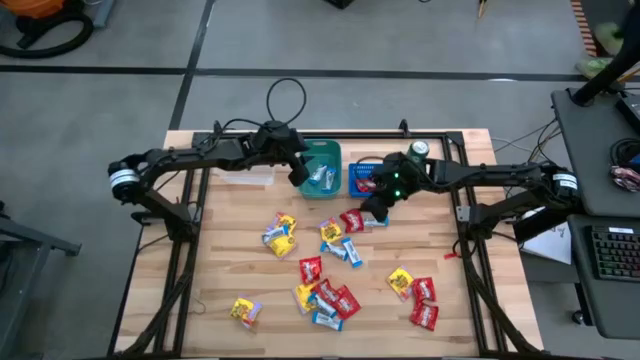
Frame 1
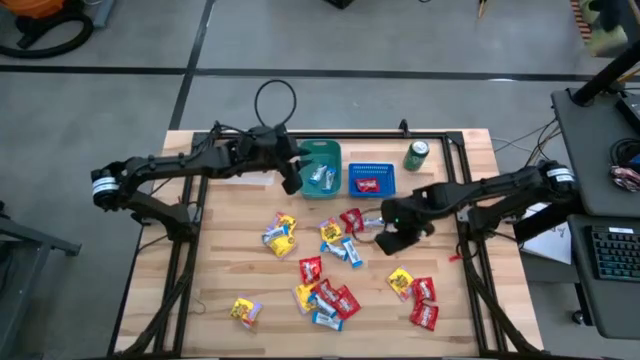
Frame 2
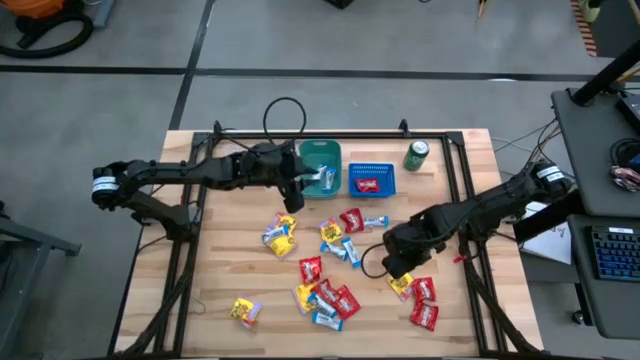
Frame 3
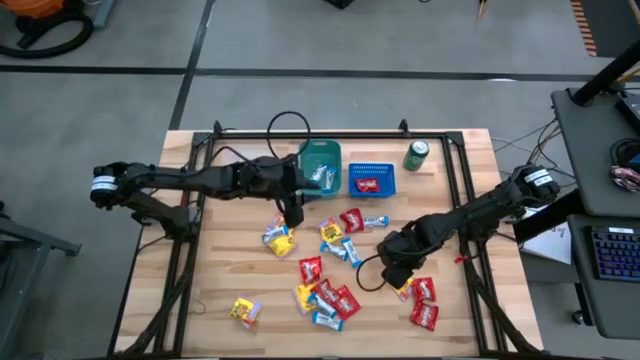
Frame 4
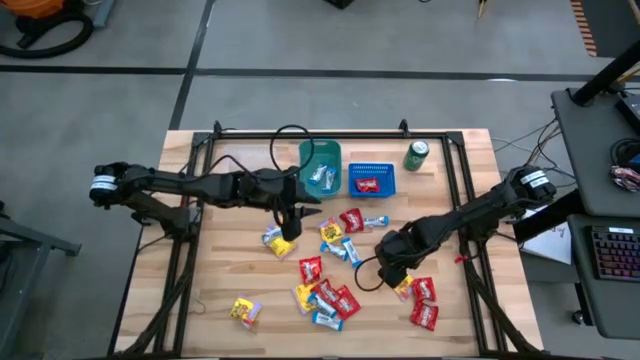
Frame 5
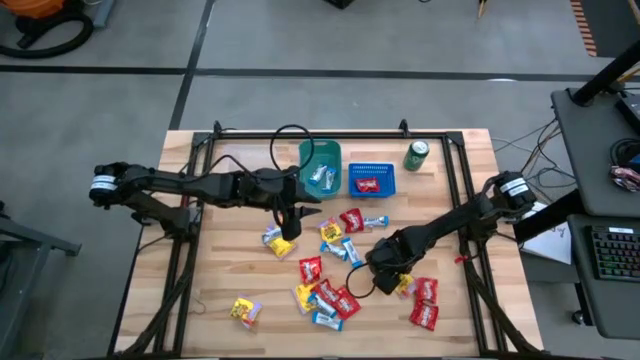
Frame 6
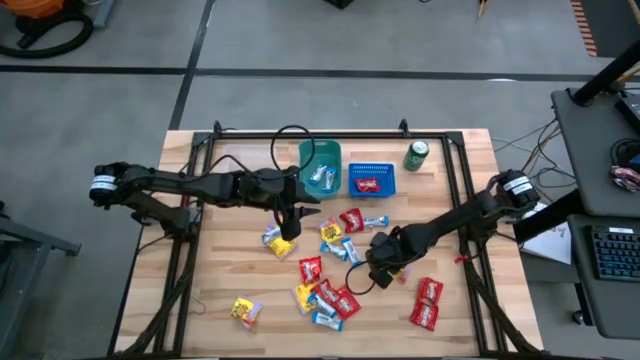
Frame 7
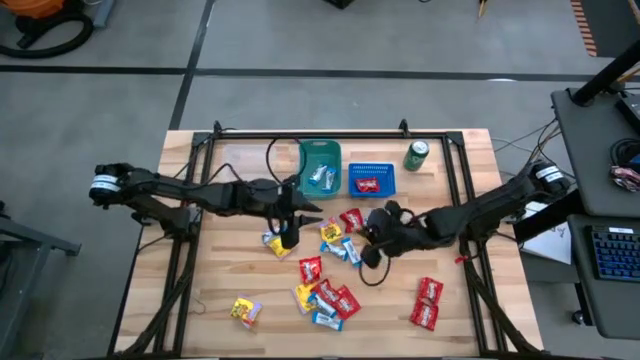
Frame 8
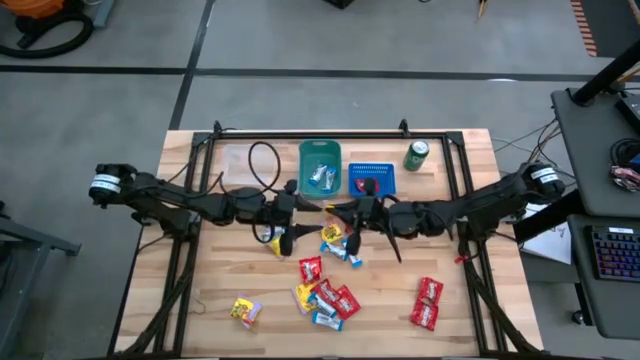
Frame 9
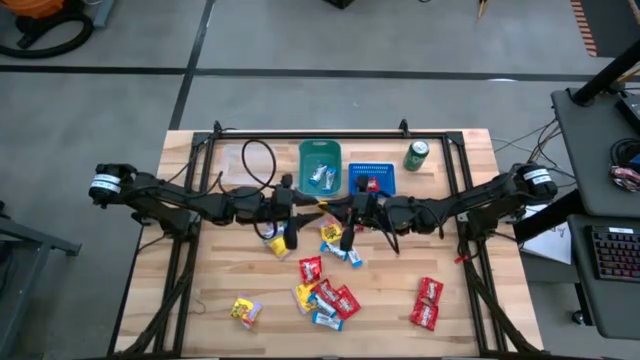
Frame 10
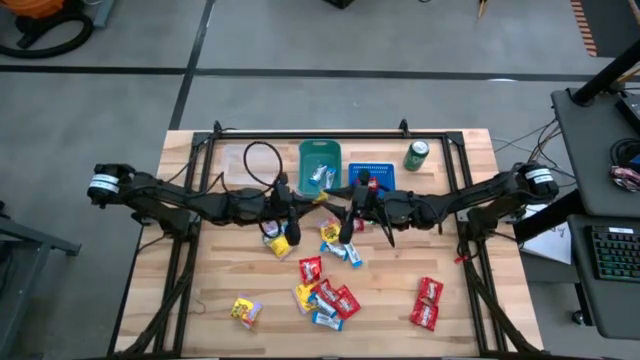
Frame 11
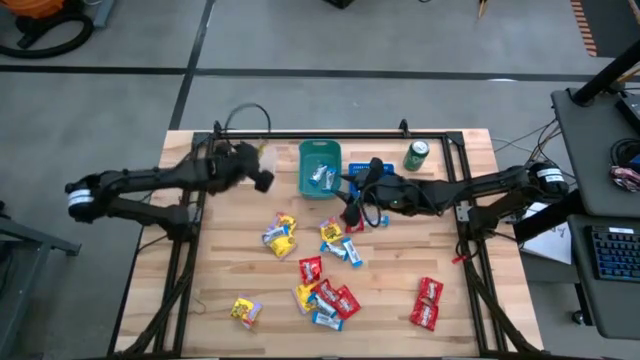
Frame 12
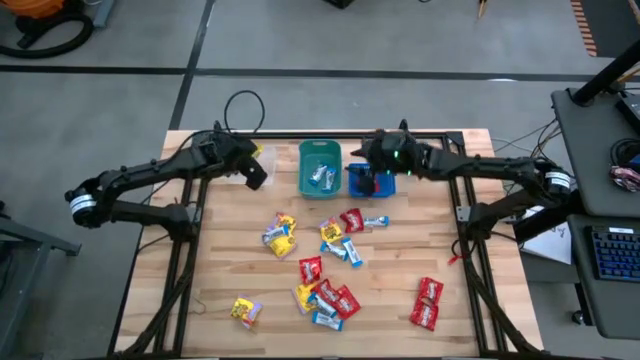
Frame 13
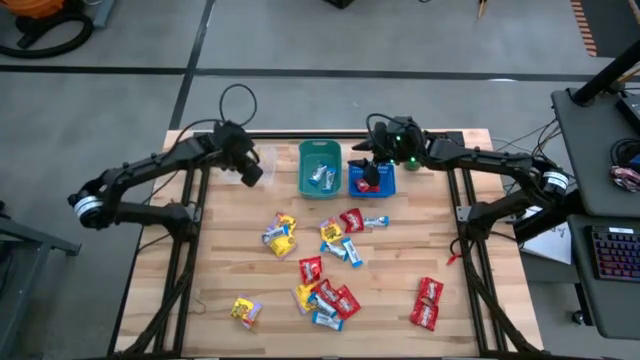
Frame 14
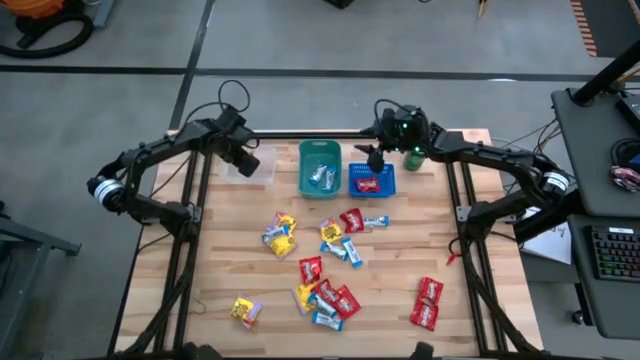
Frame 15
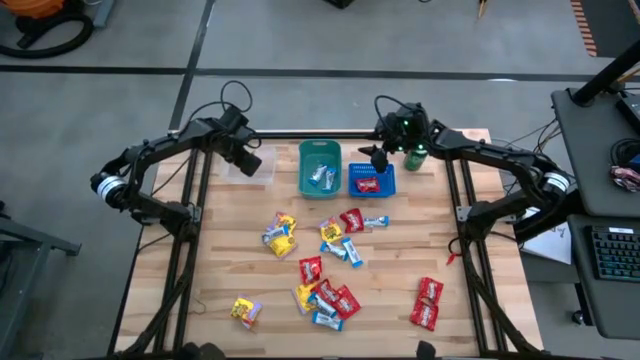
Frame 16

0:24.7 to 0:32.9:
Task: Sort candy
Put the yellow candy into the transparent bin

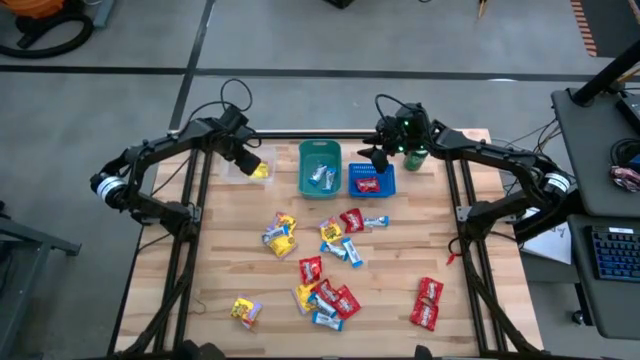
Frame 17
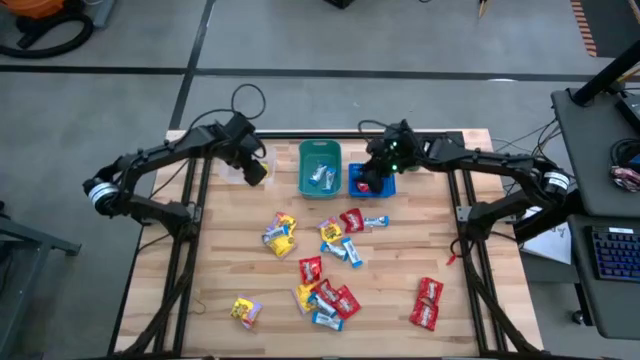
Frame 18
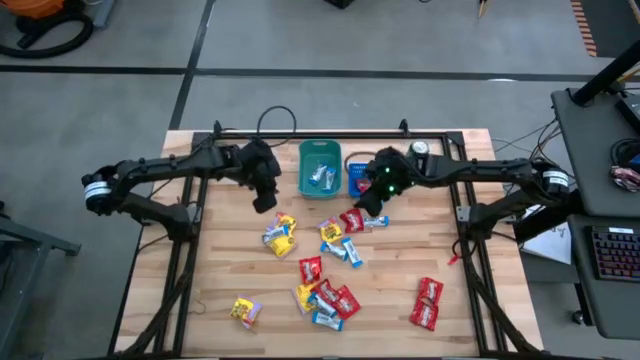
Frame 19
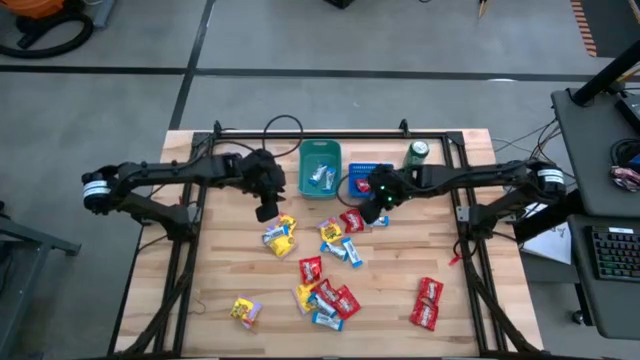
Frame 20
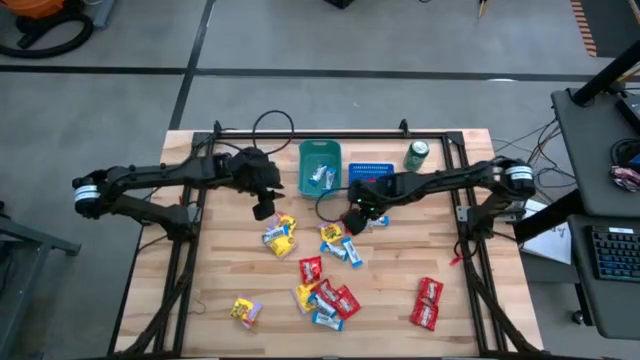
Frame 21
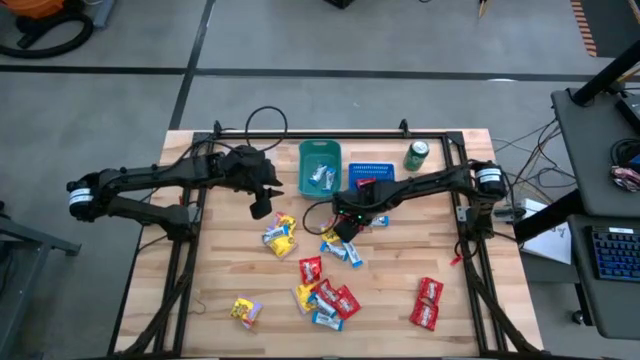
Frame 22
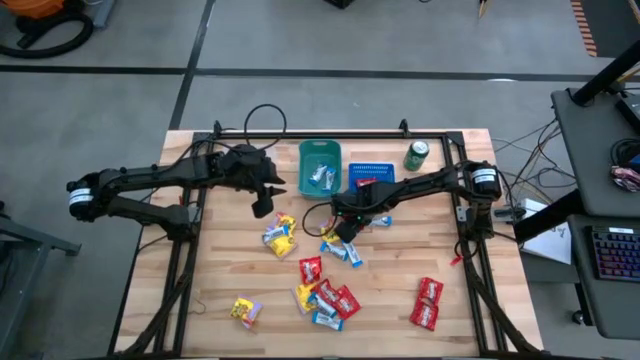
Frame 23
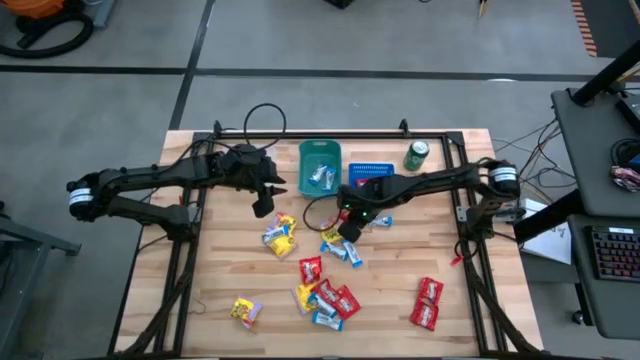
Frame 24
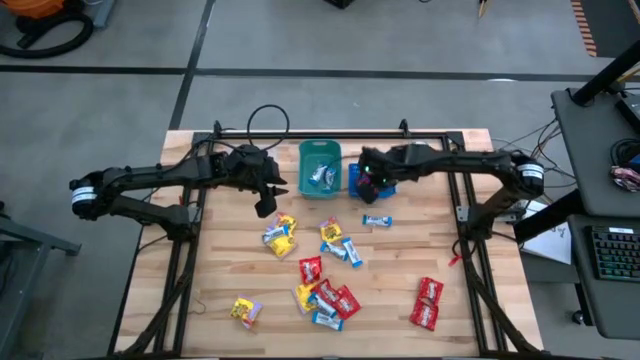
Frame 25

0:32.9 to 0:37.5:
Put the red candy into the blue bin

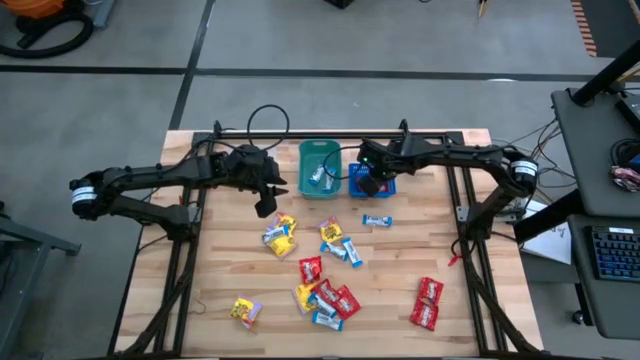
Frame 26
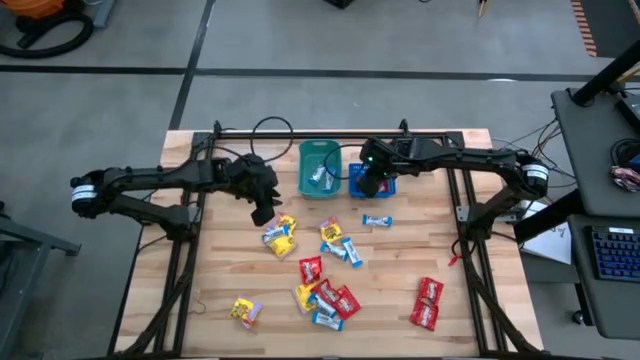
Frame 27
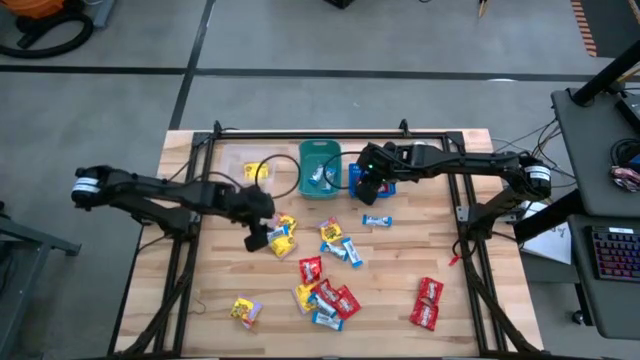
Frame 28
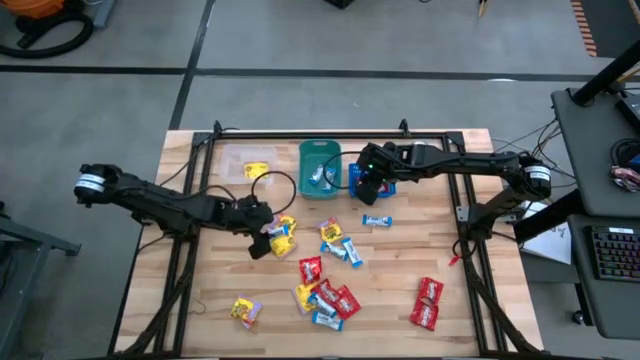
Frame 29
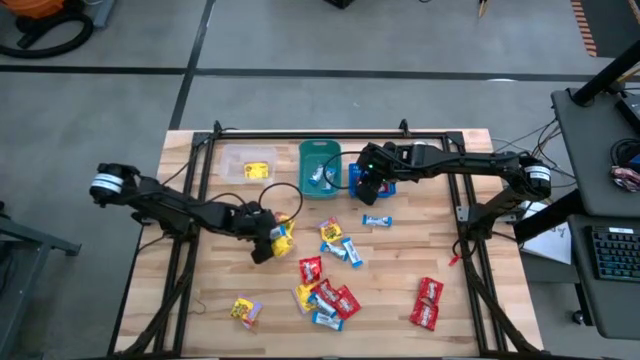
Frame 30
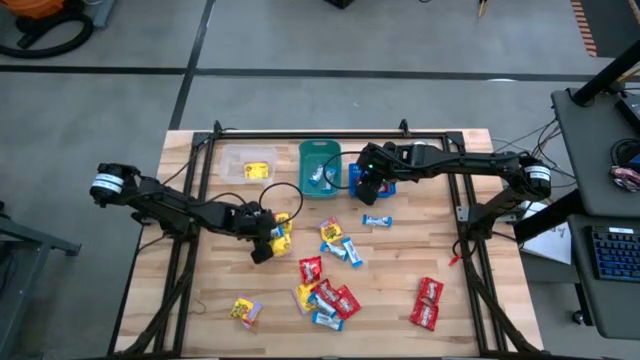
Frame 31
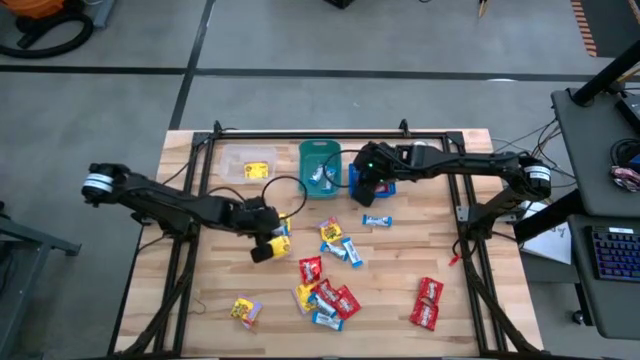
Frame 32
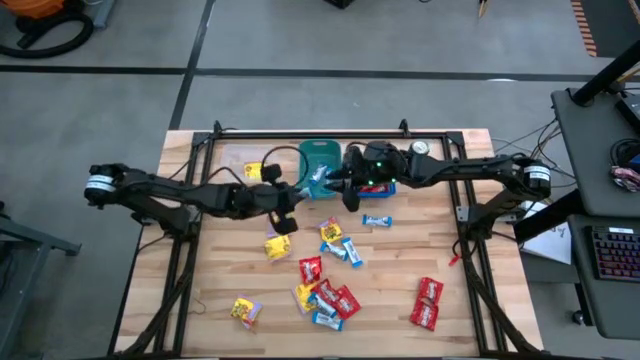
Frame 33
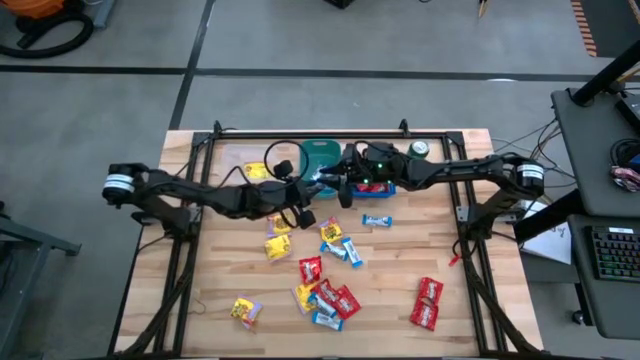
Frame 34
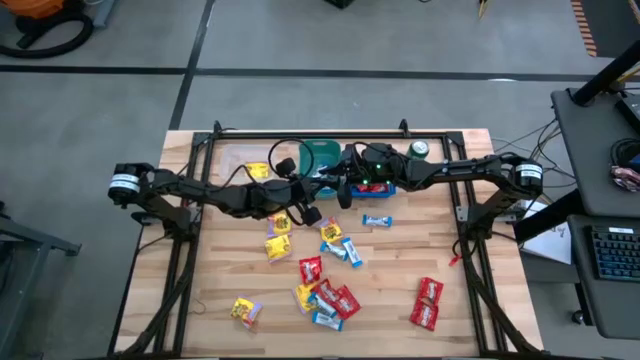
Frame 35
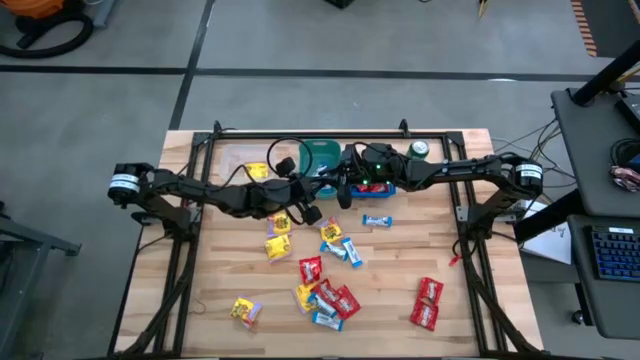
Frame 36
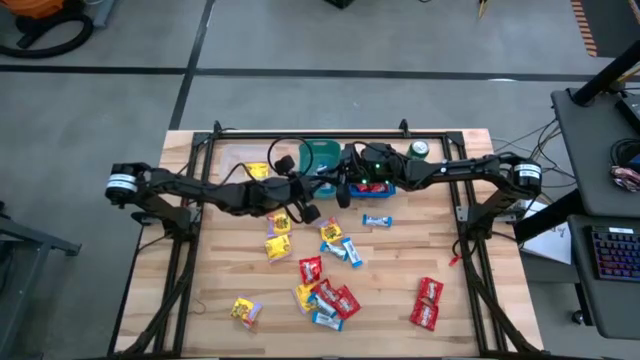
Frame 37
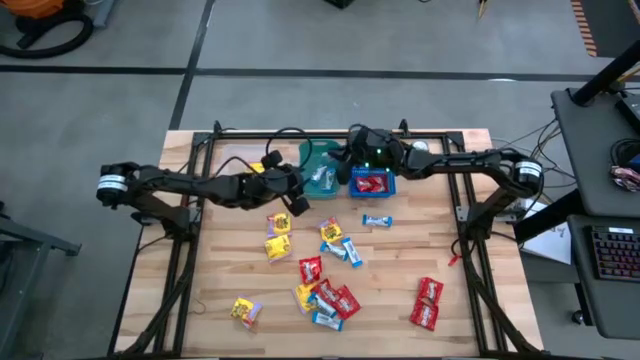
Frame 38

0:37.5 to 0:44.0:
Put the white chocolate into the green bin

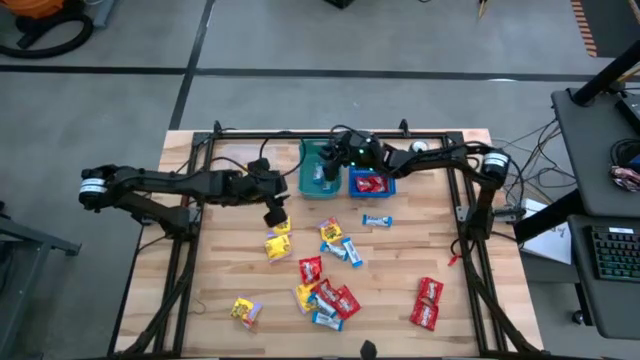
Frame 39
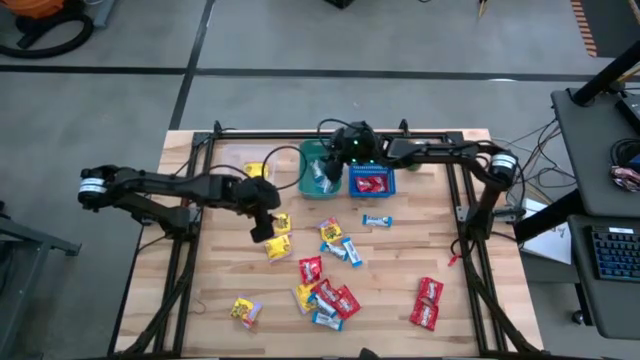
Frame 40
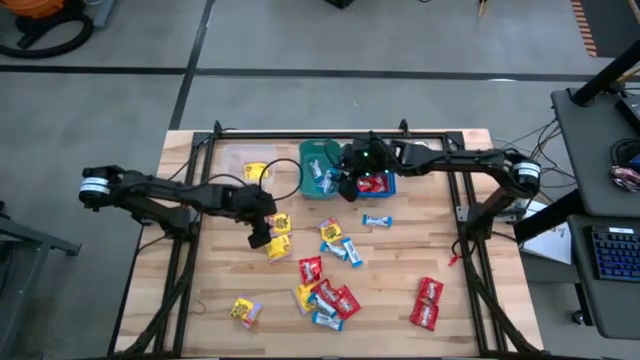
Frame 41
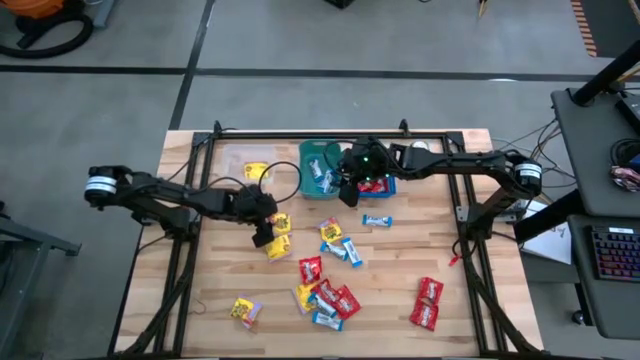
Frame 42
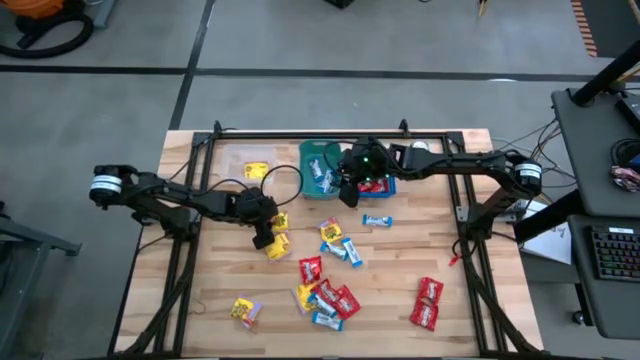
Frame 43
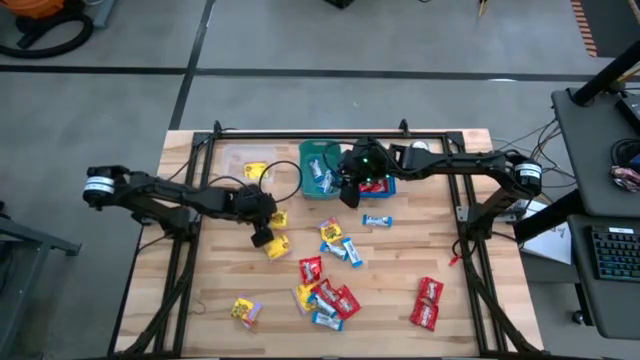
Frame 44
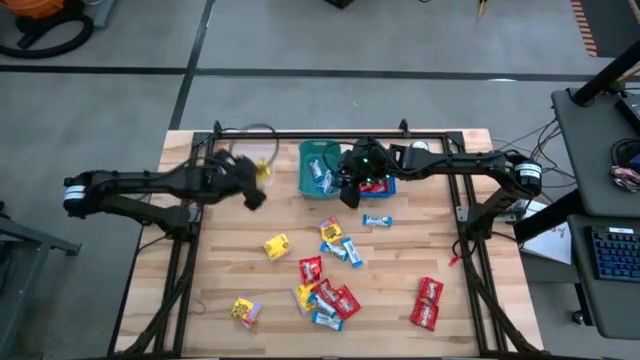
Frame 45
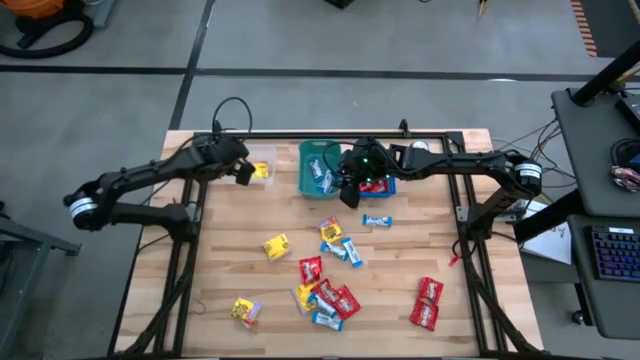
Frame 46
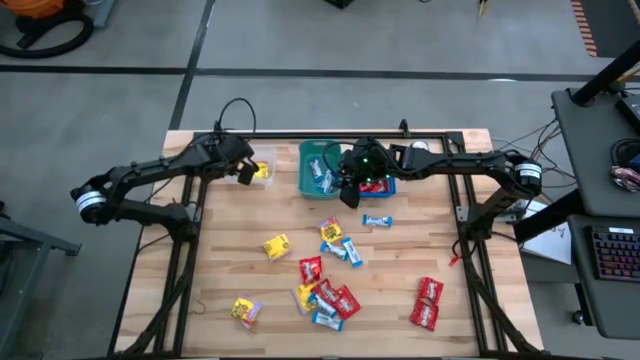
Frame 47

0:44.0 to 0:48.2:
Put the yellow candy into the transparent bin
